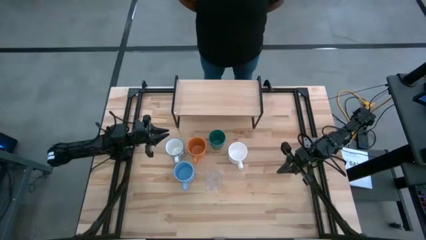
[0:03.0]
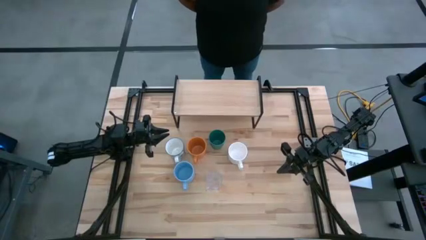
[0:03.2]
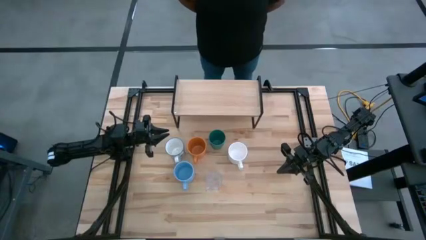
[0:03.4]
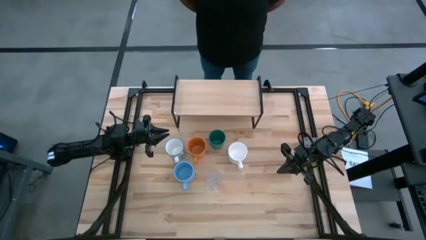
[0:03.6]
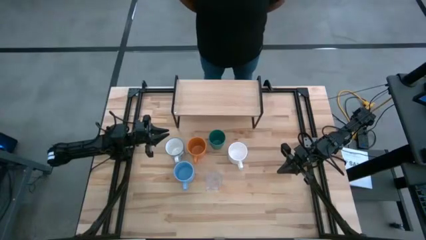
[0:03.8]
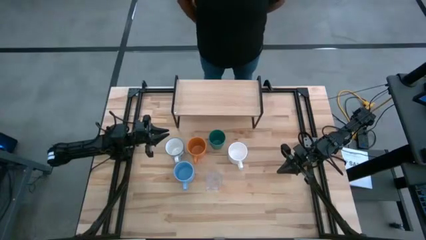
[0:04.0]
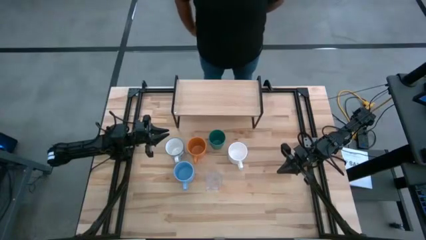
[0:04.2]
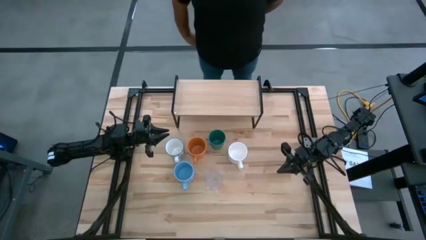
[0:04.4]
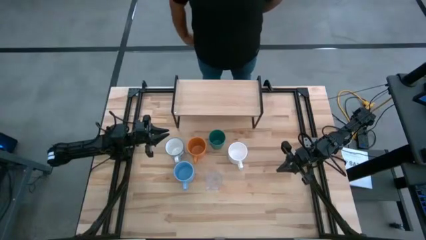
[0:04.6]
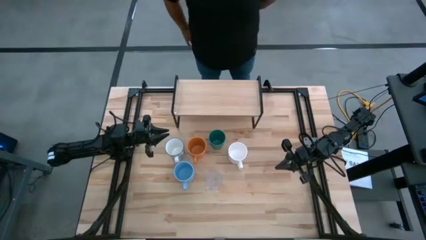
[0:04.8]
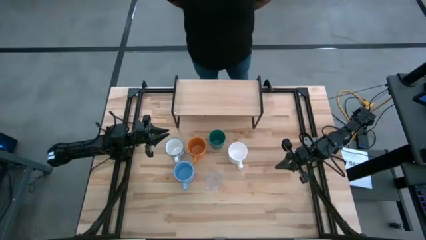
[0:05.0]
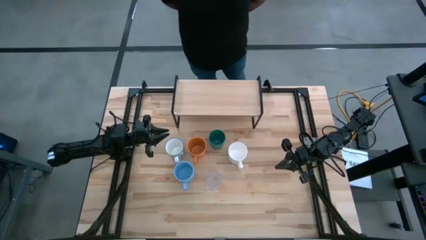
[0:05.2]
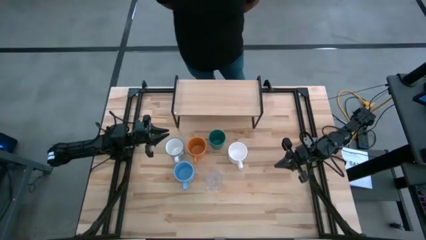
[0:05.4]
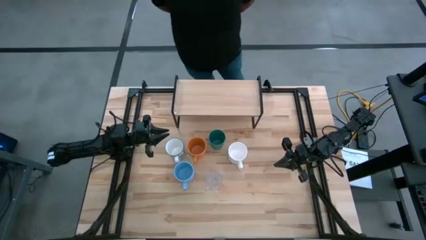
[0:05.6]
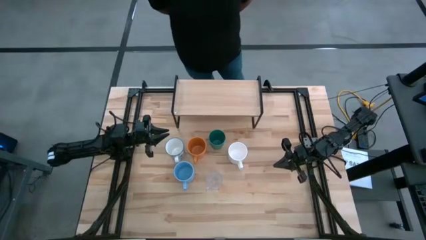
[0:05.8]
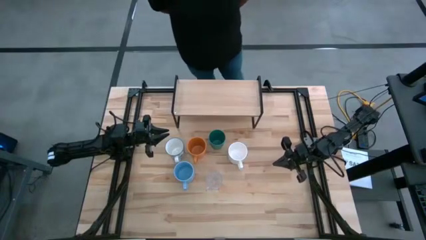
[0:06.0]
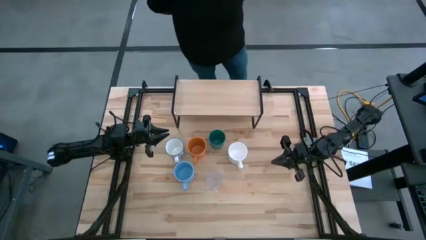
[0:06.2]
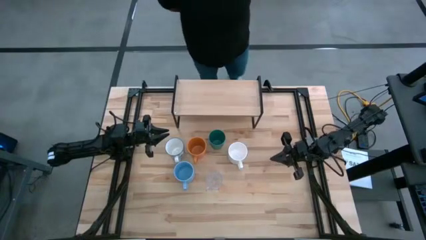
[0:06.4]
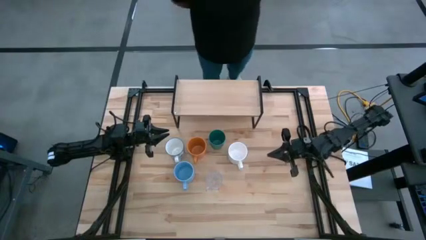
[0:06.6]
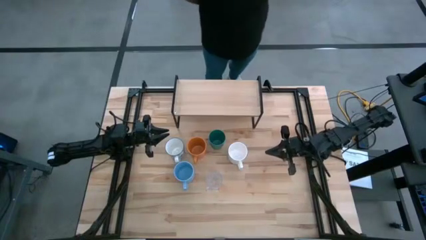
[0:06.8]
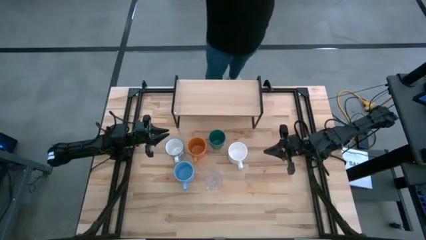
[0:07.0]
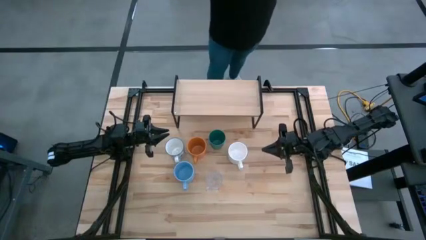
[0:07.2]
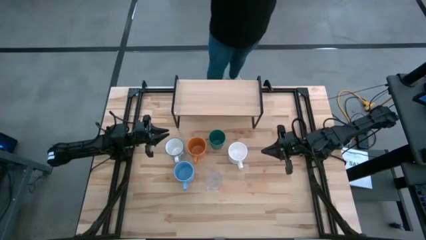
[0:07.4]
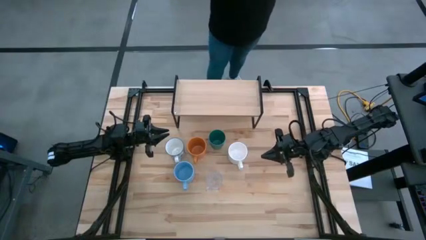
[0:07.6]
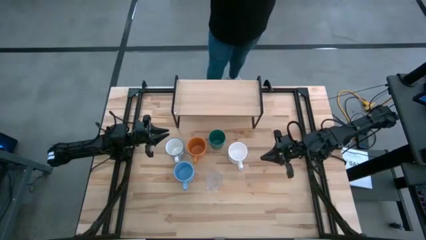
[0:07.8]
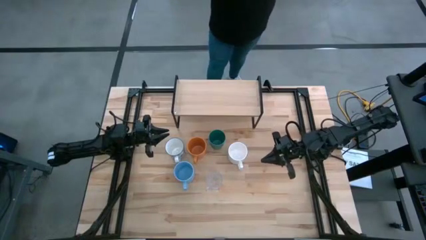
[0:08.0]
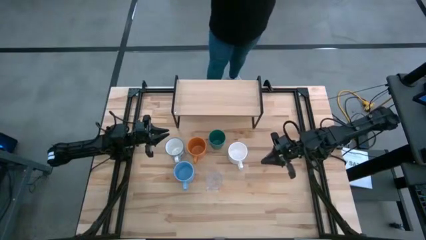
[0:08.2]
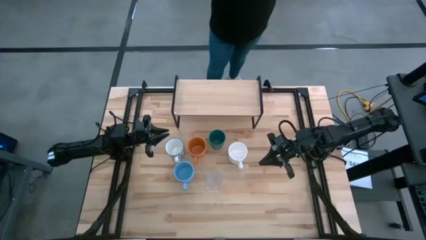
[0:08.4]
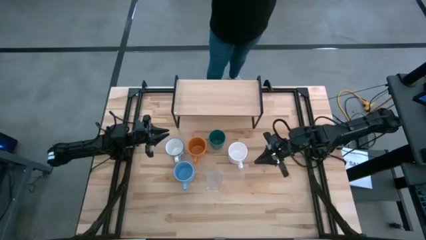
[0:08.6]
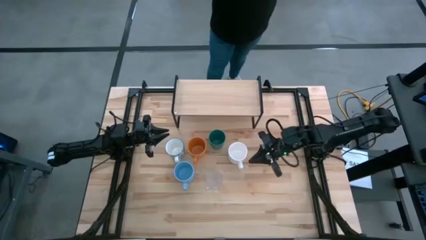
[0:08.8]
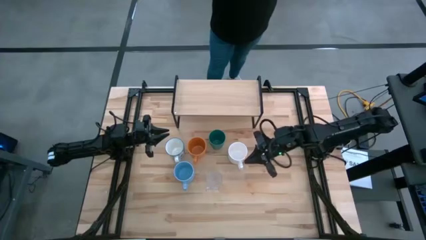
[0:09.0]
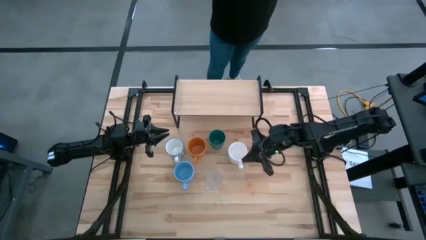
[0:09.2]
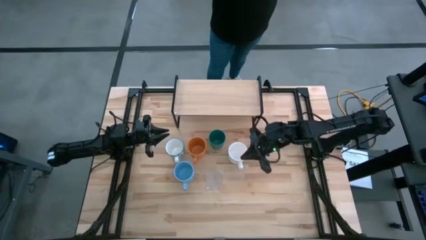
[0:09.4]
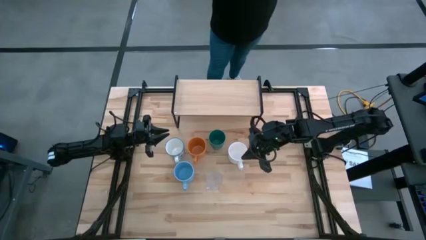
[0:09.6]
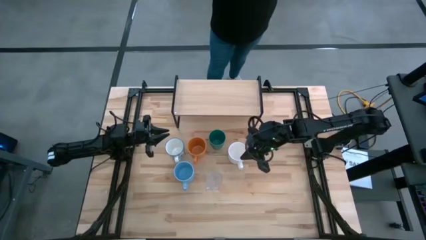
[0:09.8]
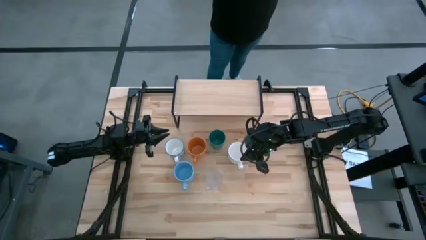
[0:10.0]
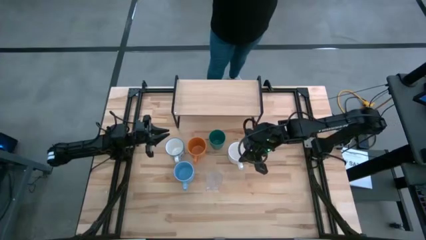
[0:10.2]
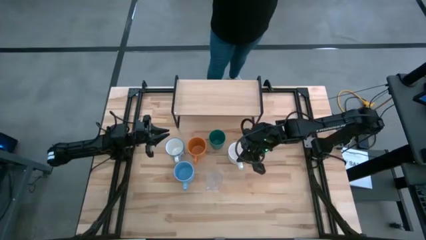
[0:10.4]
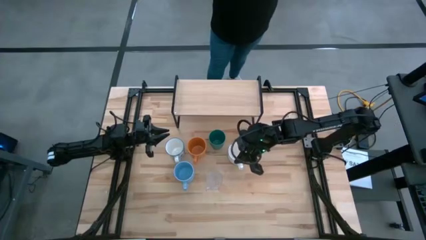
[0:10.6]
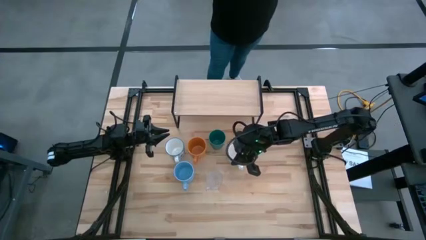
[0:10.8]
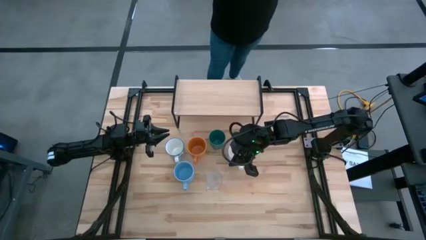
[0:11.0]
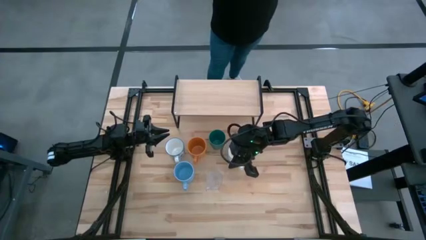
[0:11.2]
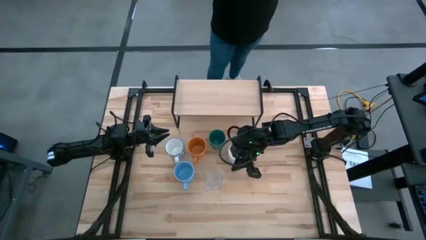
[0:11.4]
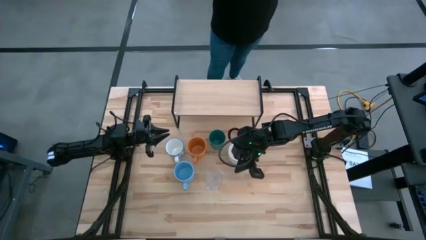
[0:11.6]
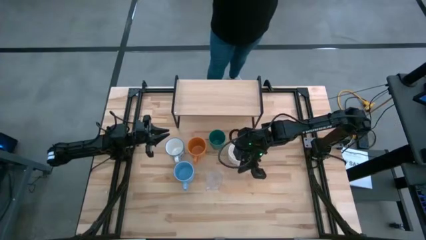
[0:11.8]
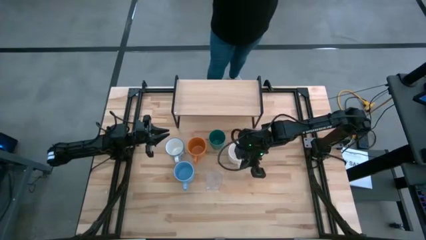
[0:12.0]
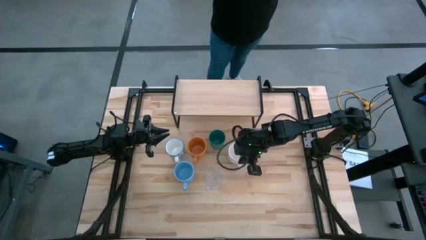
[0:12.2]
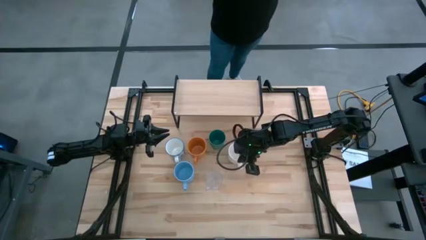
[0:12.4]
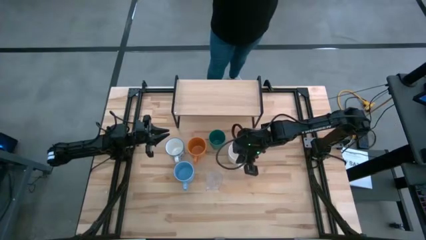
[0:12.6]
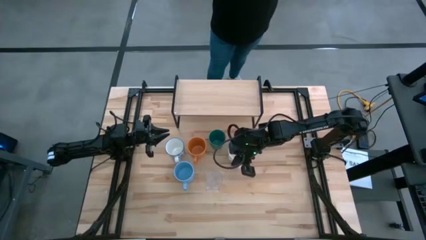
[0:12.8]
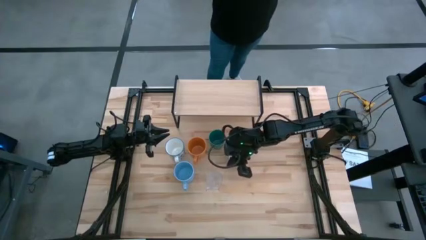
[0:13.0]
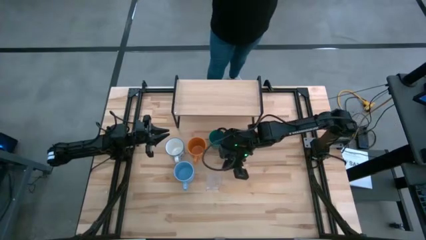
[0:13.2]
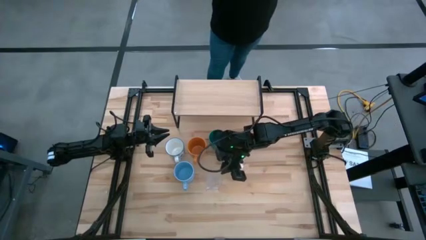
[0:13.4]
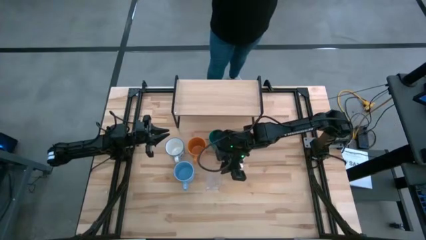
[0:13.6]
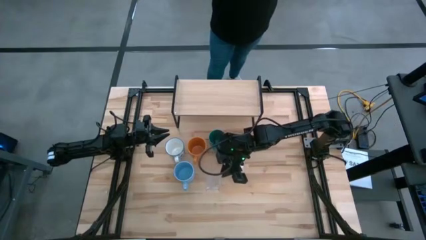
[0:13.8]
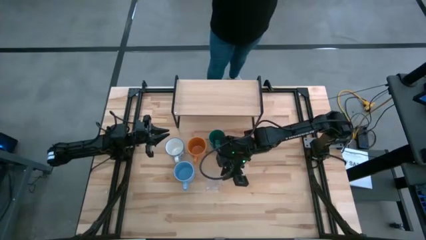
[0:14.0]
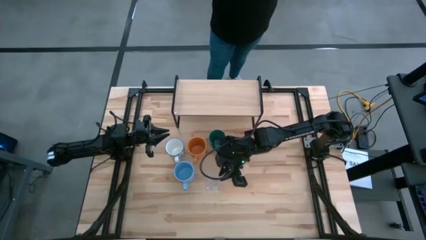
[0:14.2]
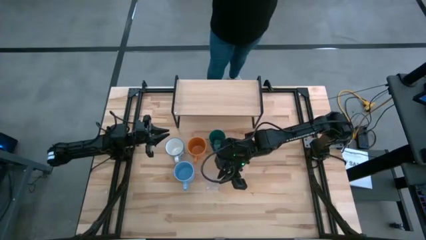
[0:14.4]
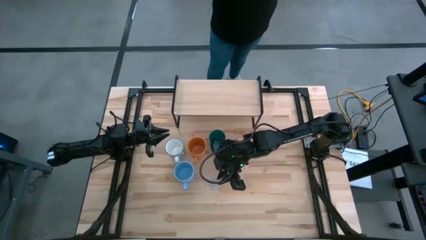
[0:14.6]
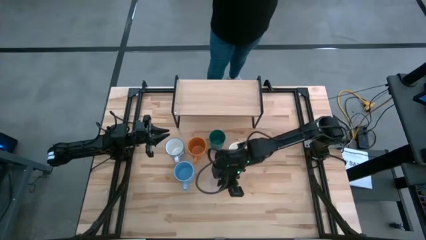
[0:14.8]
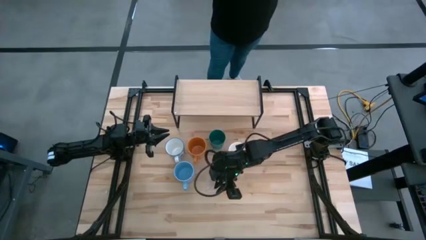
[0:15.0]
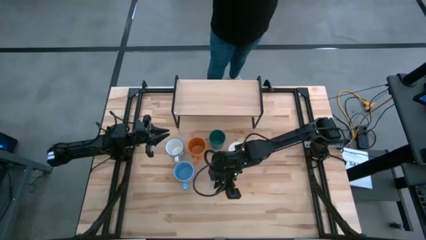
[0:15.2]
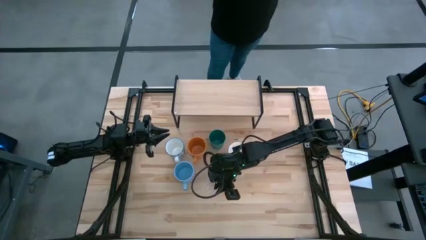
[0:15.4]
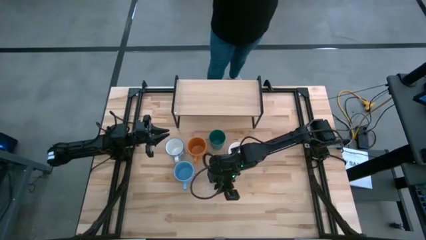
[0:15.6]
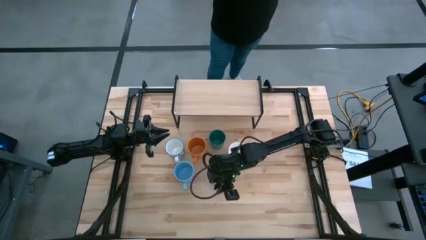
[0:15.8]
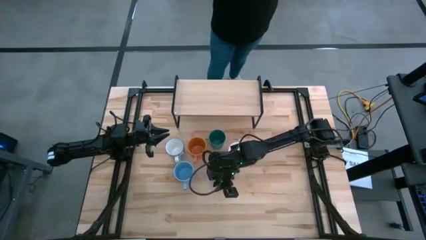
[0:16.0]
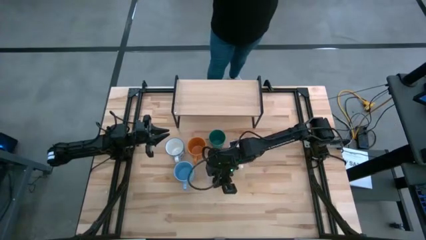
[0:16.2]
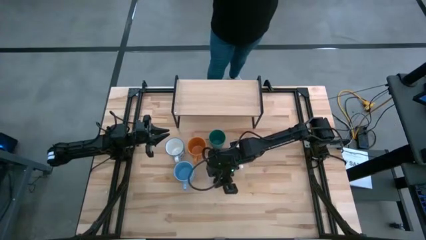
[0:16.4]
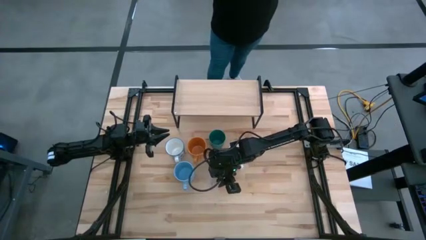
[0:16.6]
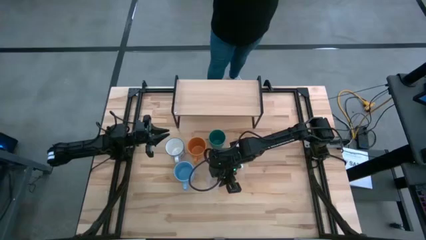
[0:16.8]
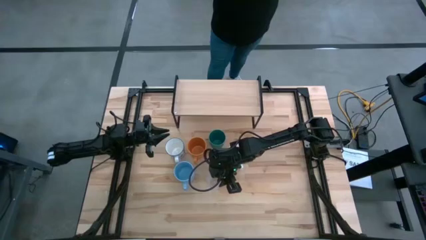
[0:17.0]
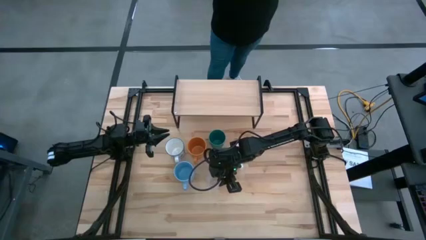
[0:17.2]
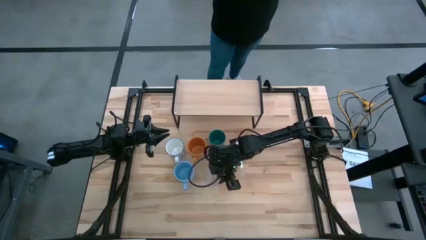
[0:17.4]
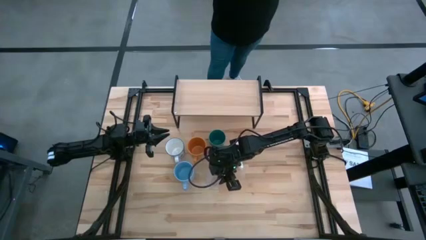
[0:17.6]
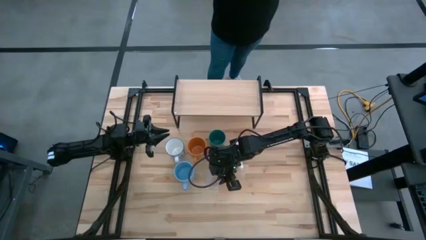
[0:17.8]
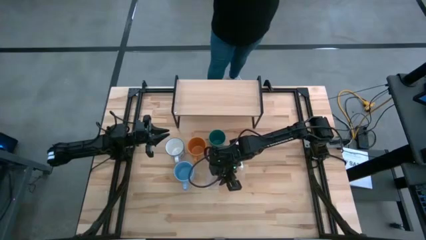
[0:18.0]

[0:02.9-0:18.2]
Task: Stack small to large cups/mugs on shelf
Put the transparent mug on the shelf

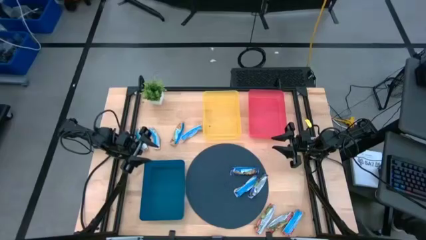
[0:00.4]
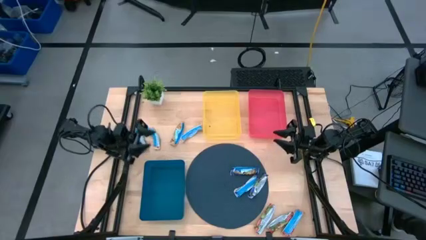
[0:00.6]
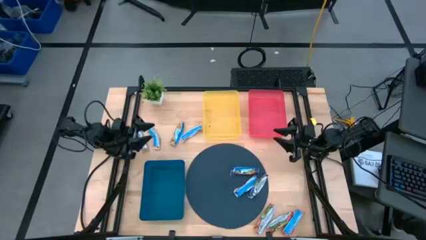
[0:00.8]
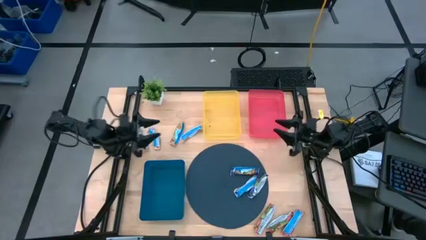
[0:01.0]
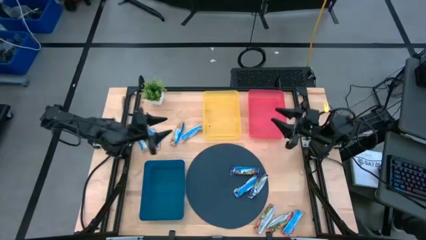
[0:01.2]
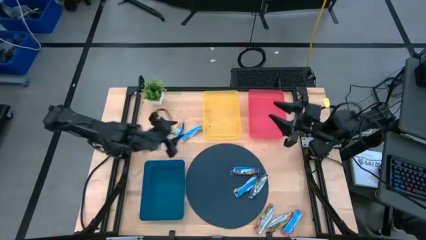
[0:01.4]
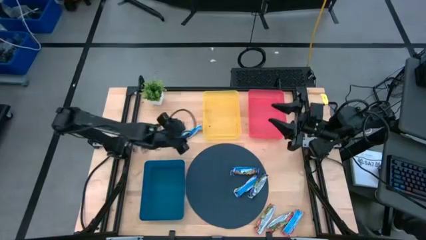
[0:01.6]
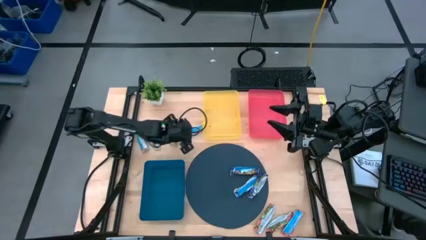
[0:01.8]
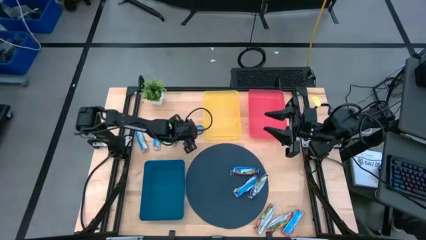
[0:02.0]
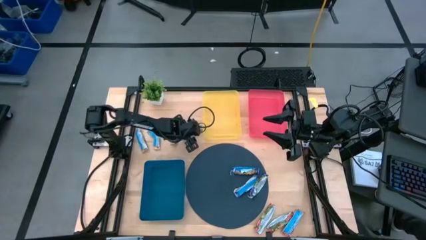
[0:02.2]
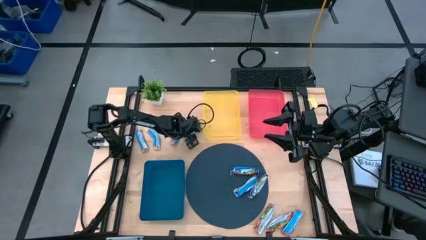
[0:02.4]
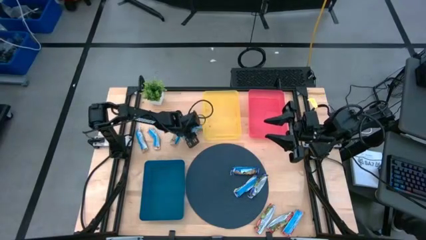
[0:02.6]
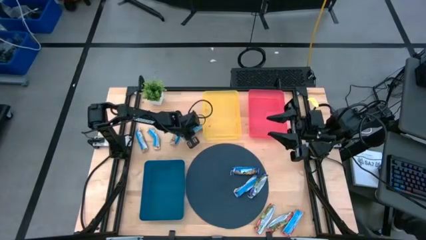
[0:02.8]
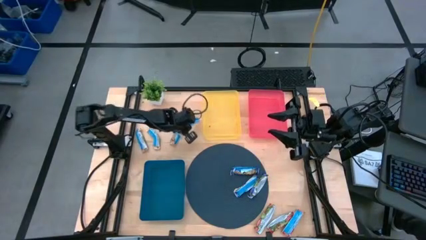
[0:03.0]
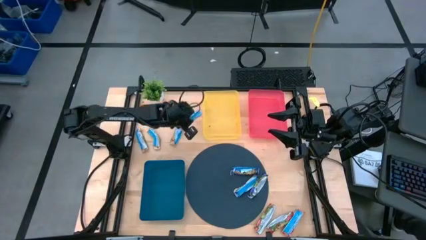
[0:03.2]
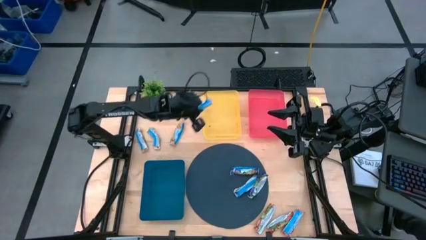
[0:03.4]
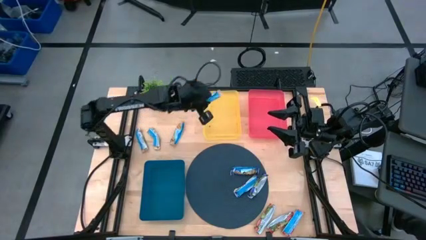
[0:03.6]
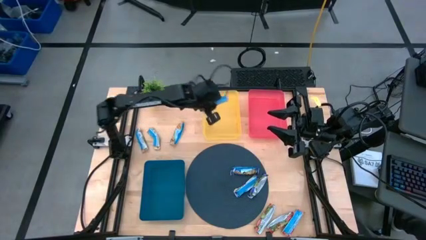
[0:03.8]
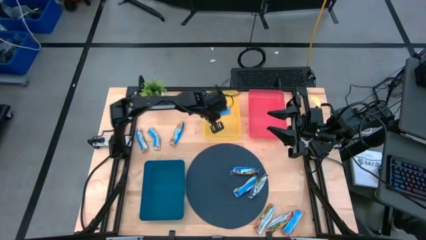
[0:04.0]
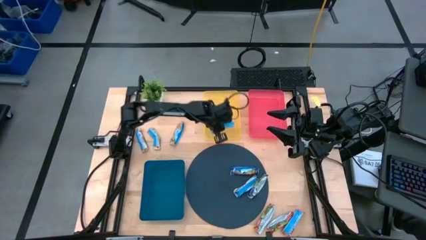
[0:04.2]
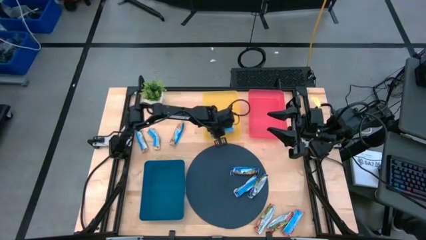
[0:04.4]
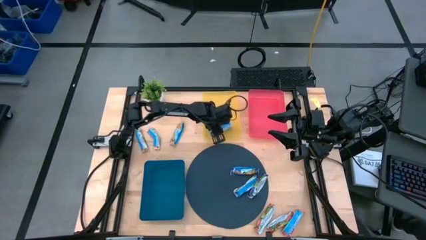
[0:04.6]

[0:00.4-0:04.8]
Task: Pick and place Granola Bars by type
Put the yellow granola bar into the yellow bin
